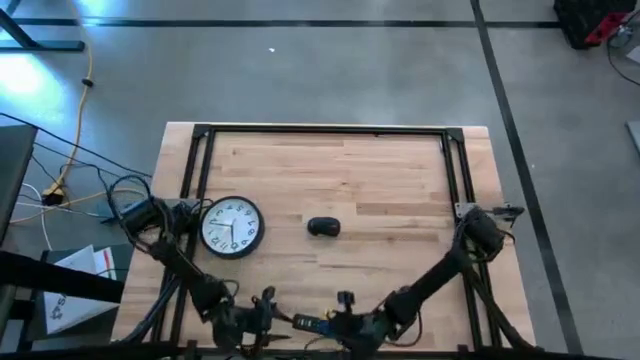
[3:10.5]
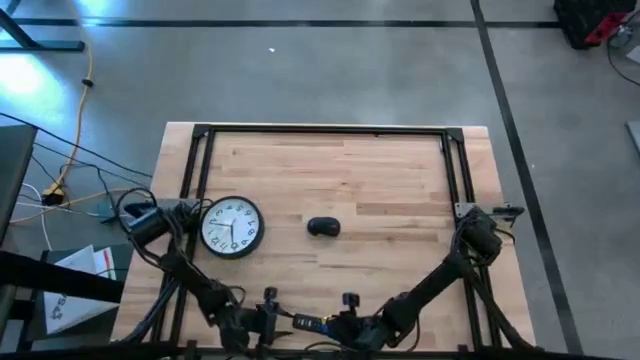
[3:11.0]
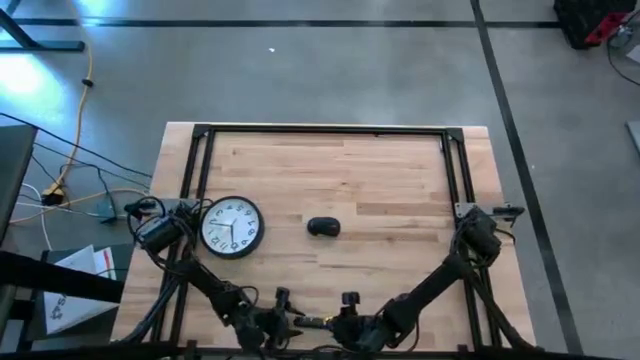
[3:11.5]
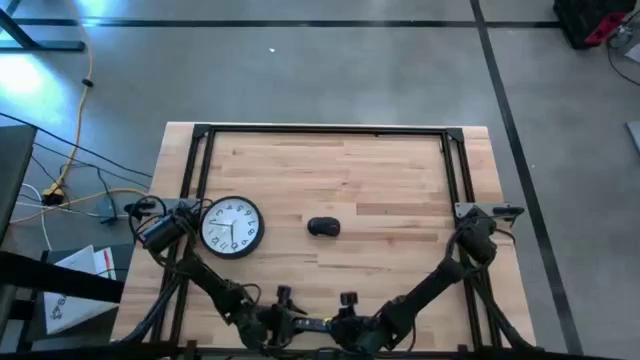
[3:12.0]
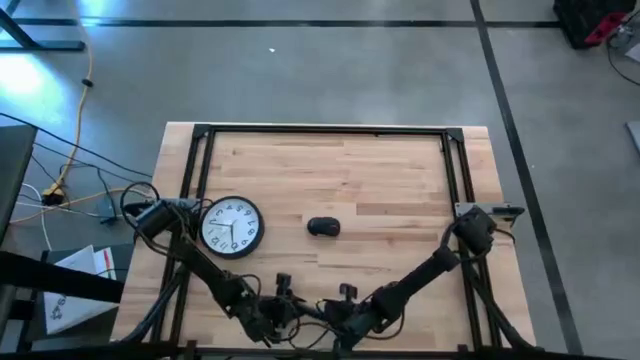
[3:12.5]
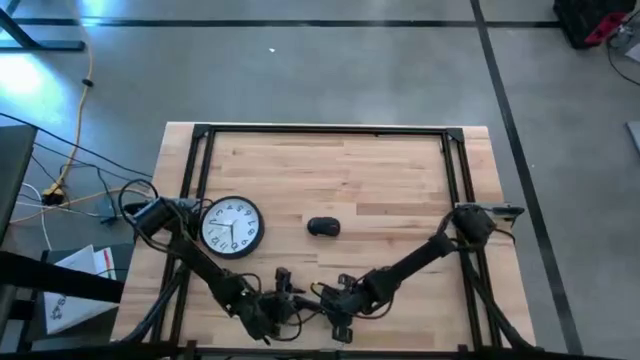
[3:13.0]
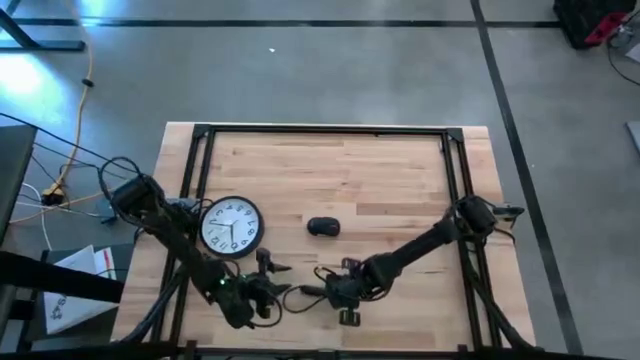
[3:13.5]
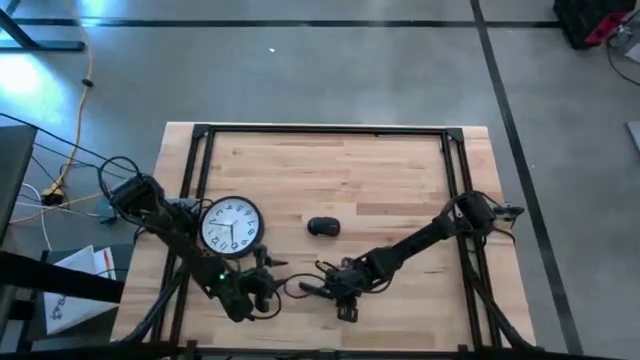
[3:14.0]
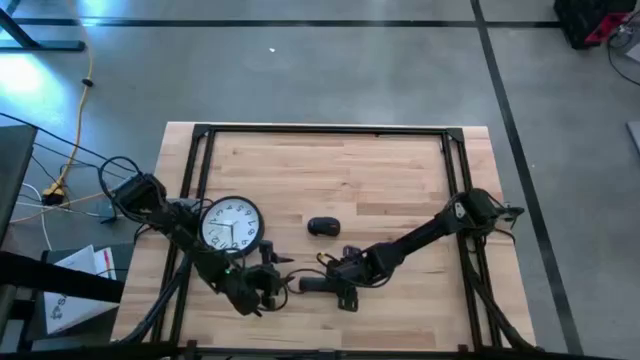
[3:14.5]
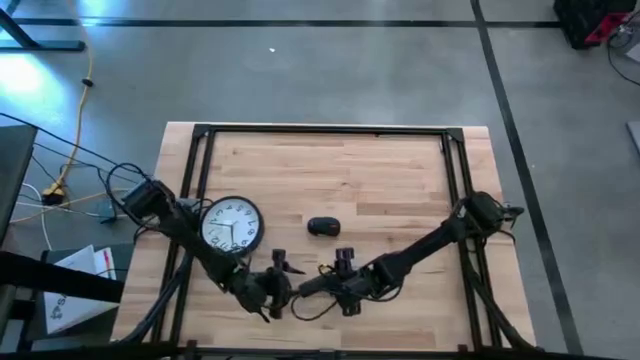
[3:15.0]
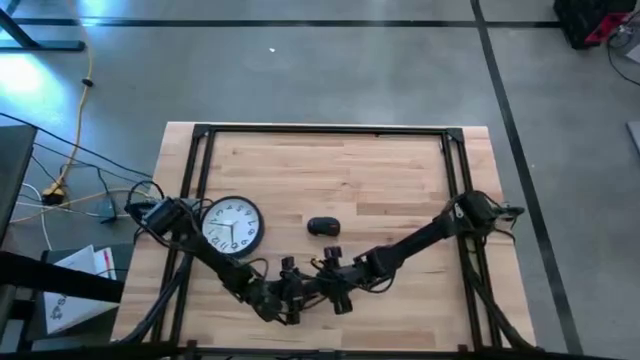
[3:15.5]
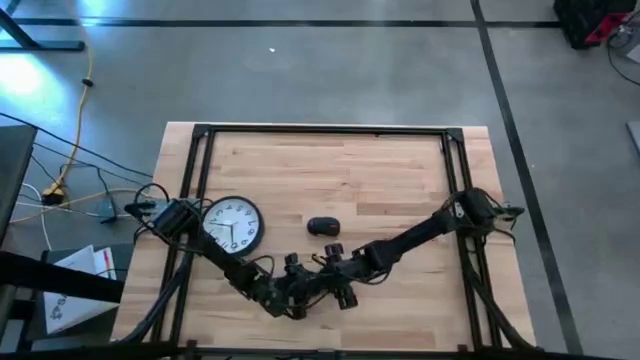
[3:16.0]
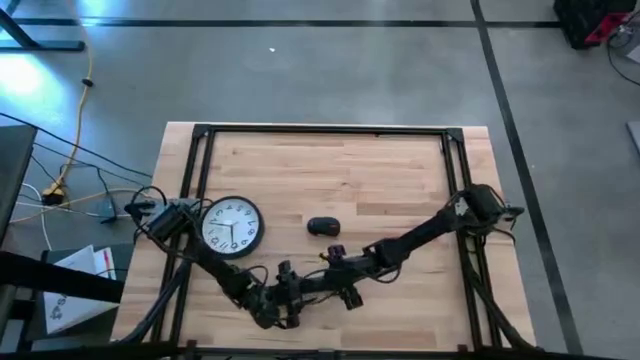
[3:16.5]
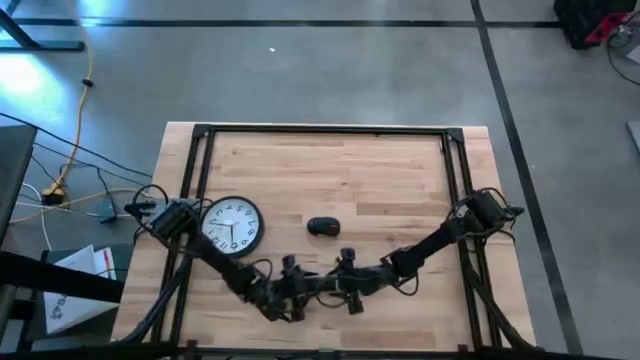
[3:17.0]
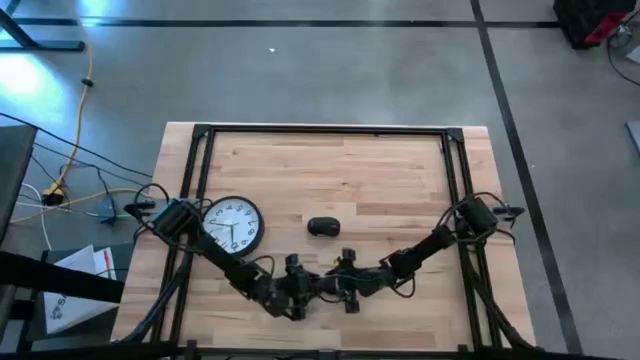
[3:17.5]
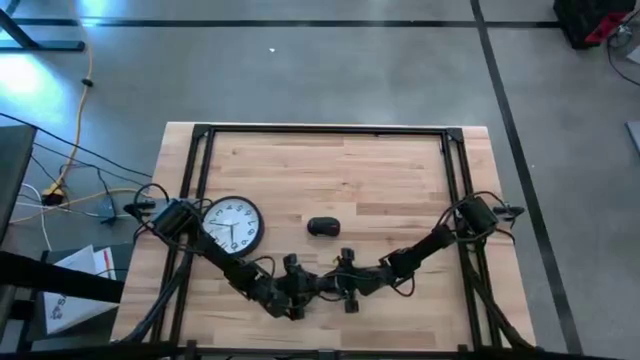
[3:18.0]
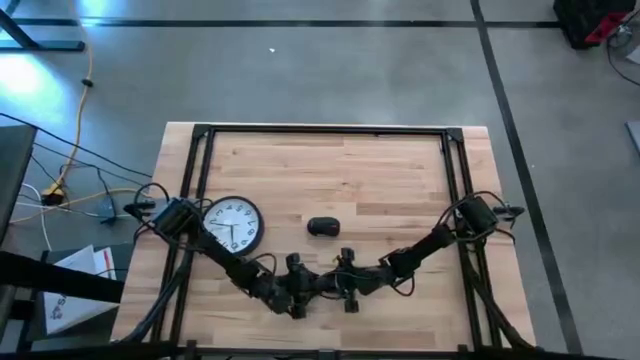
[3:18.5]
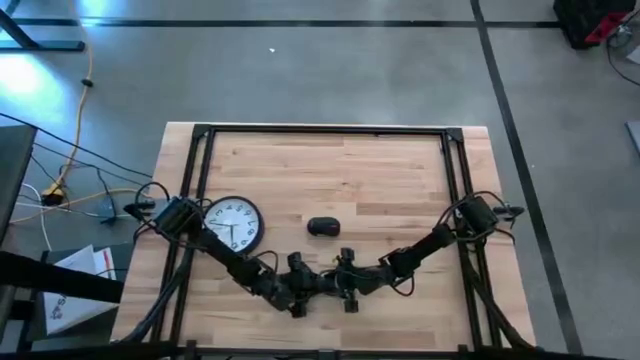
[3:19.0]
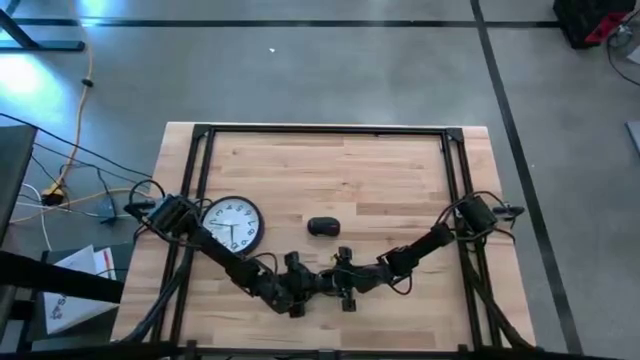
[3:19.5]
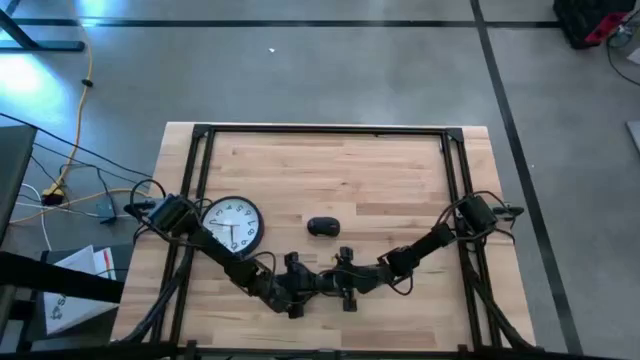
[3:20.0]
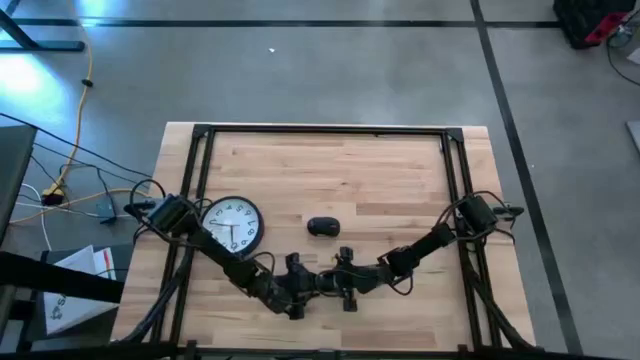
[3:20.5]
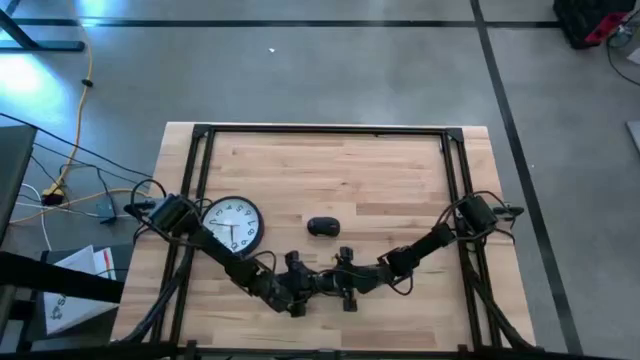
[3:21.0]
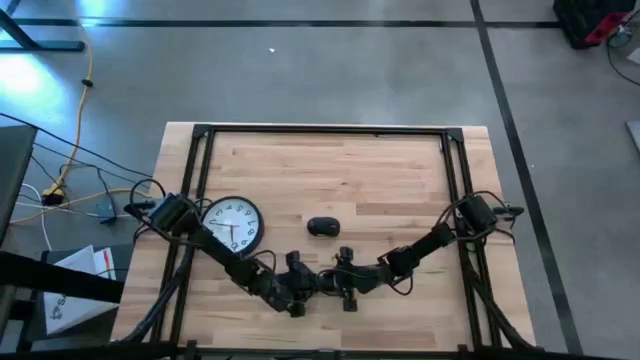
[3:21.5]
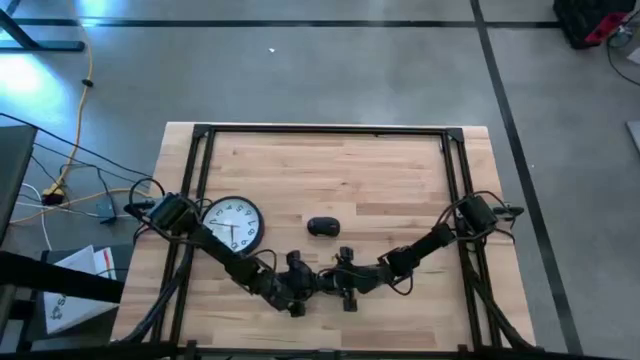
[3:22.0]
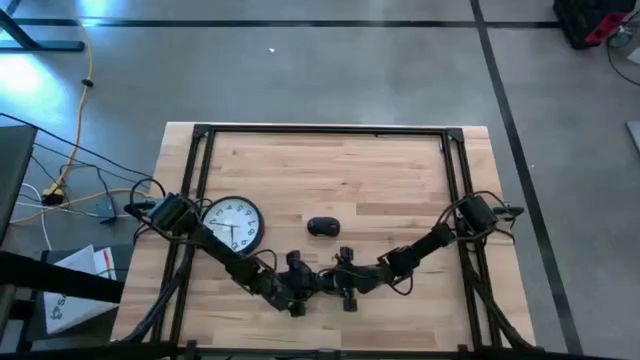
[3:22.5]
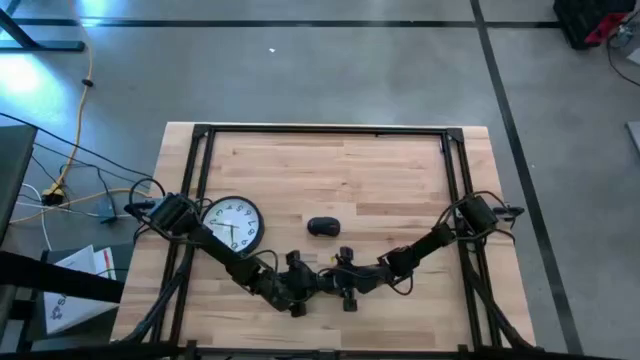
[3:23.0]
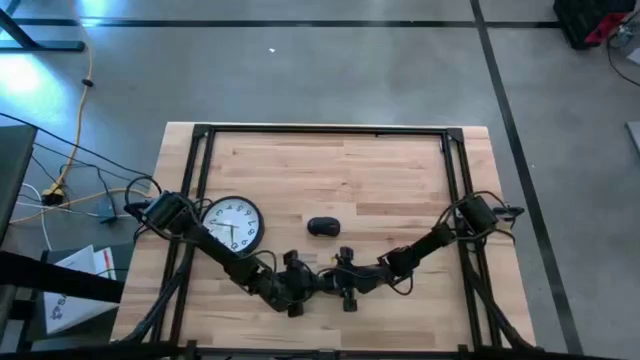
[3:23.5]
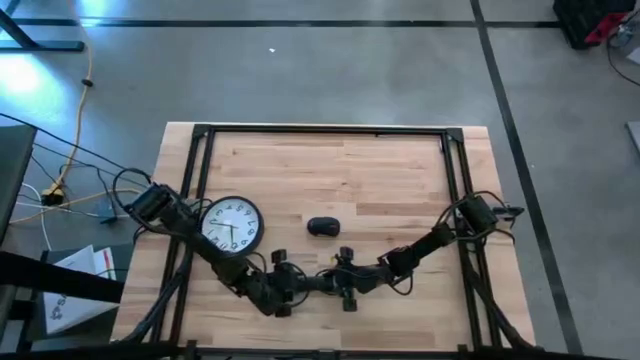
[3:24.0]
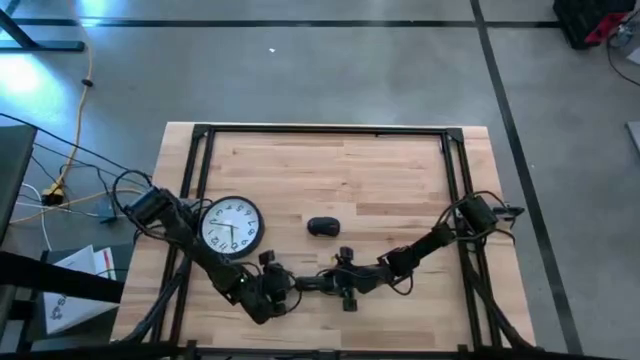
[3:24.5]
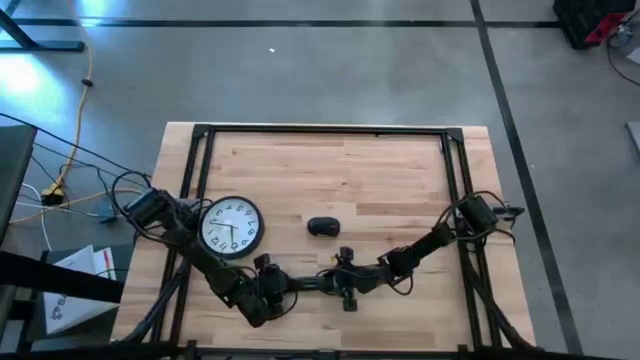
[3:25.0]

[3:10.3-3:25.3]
Task: Insert battery
Open the remote battery compartment

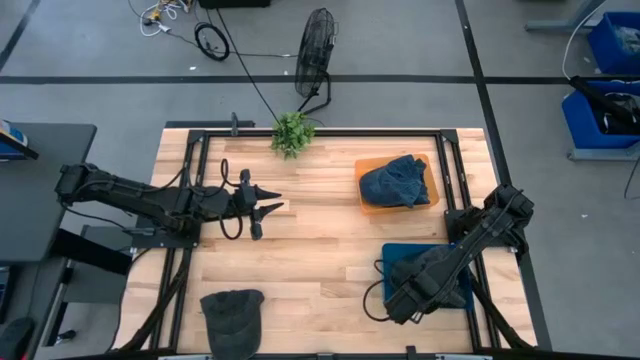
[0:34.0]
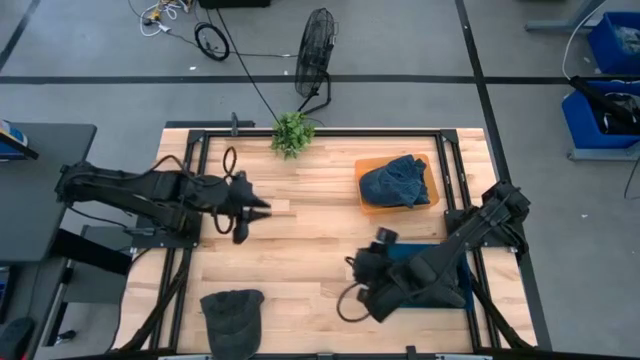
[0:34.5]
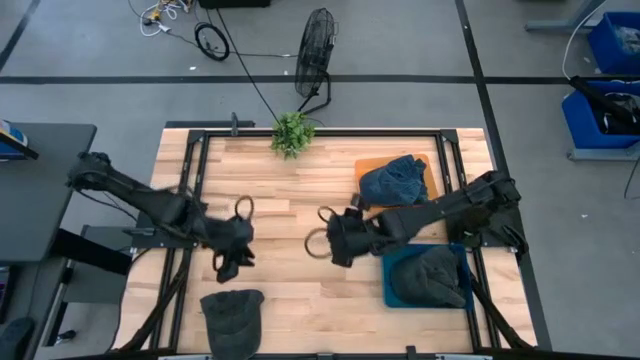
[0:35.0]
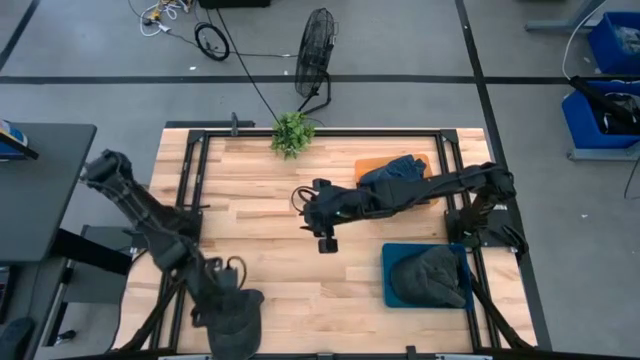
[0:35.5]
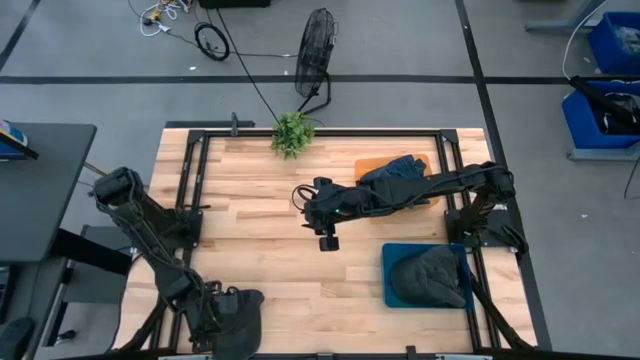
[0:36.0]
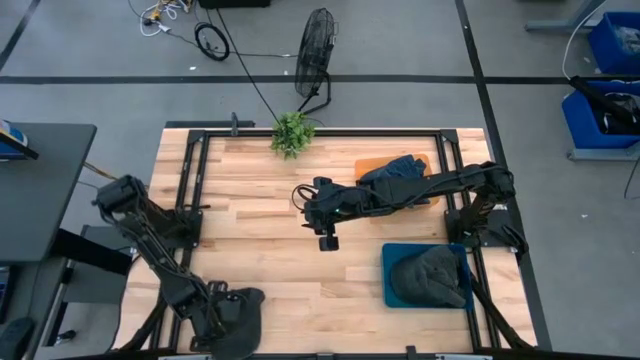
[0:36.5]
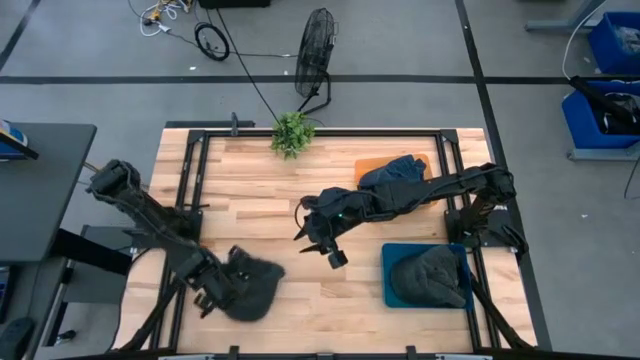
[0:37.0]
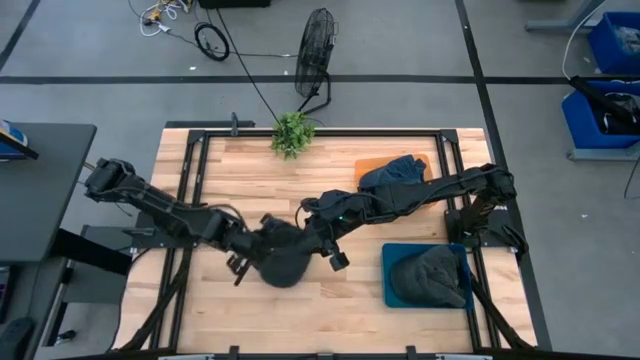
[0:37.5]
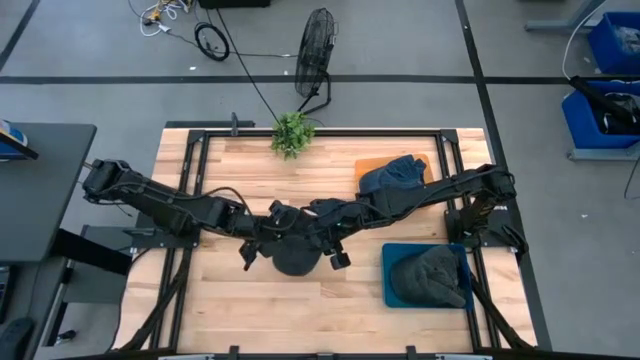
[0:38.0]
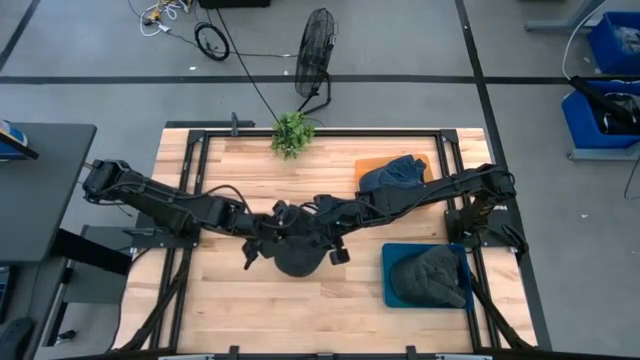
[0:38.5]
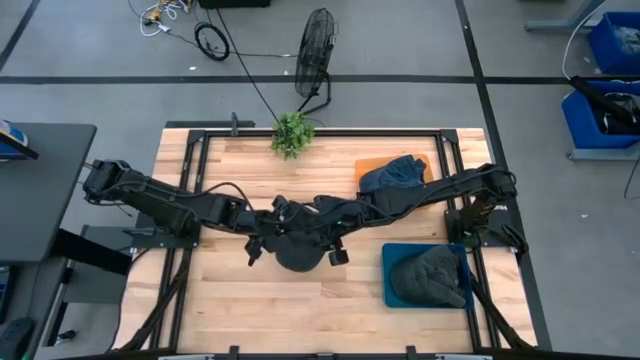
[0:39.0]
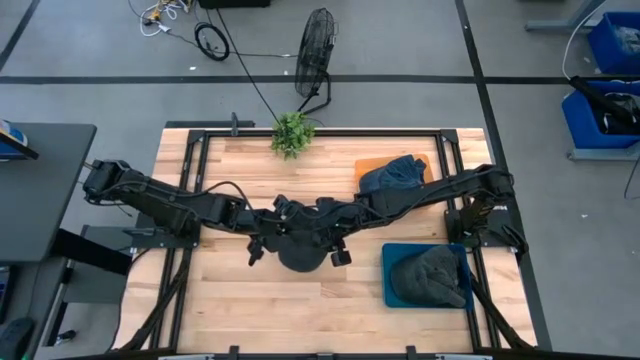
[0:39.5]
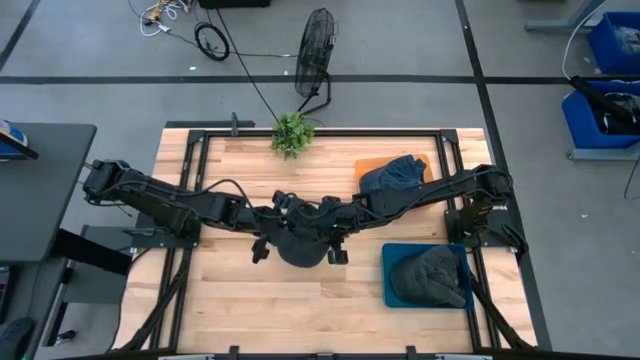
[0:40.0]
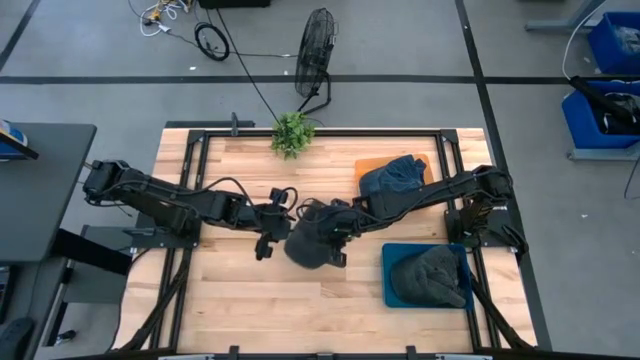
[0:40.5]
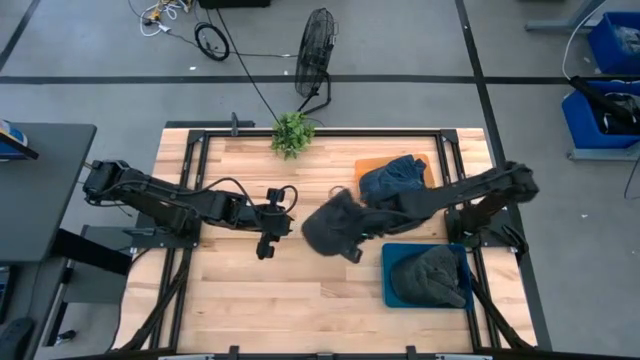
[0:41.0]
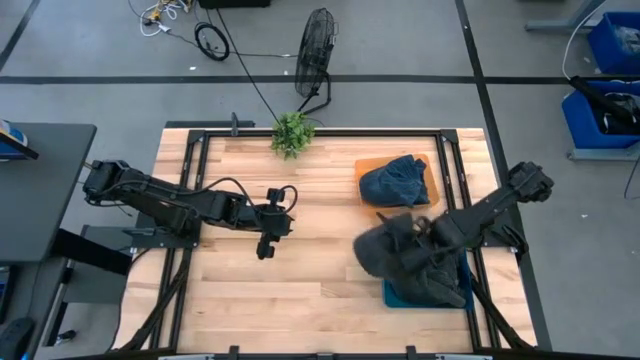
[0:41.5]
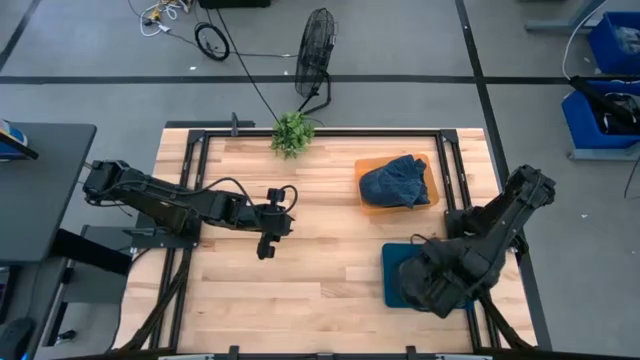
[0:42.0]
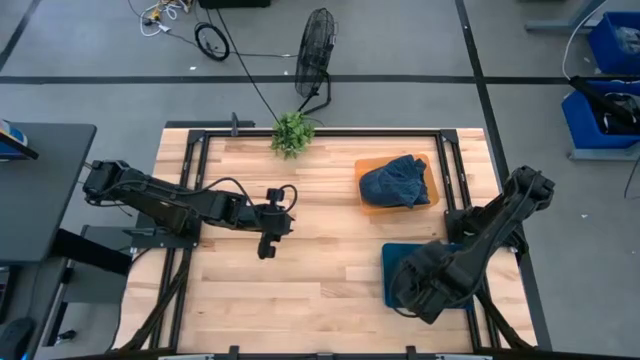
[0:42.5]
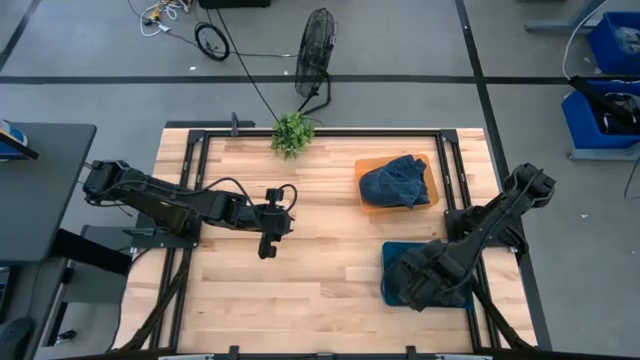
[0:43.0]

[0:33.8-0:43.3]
Task: Pick & Place hat
Put the black cap into the blue bin
